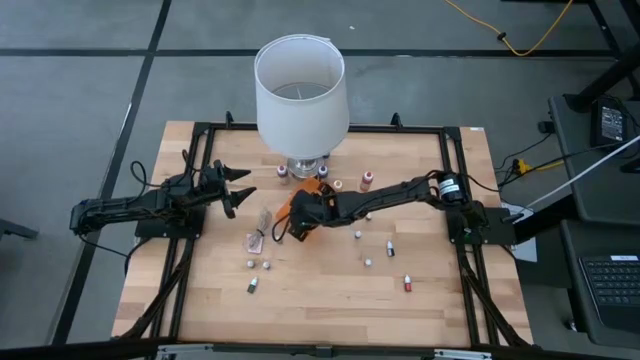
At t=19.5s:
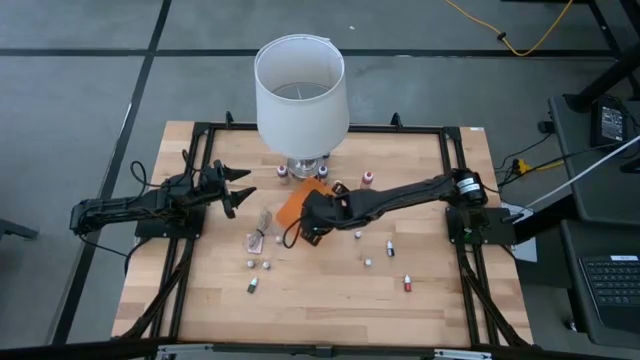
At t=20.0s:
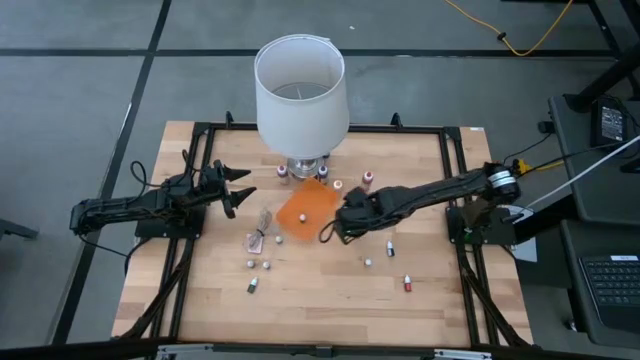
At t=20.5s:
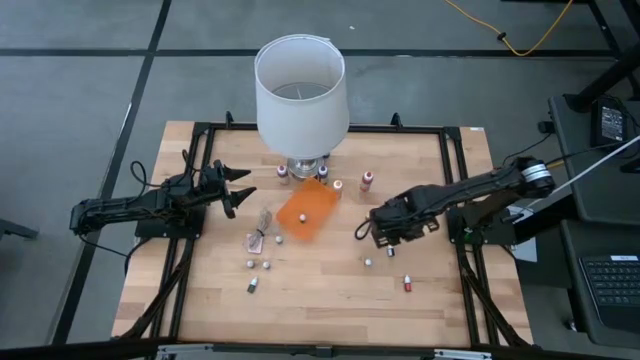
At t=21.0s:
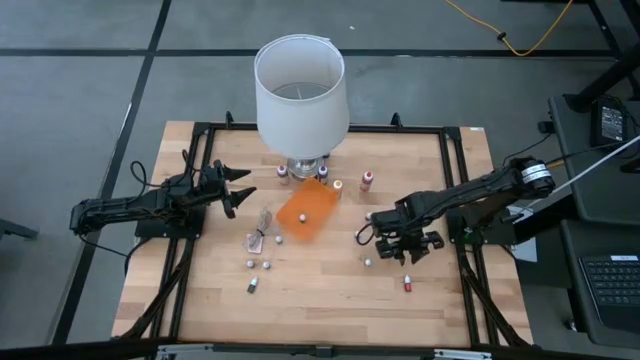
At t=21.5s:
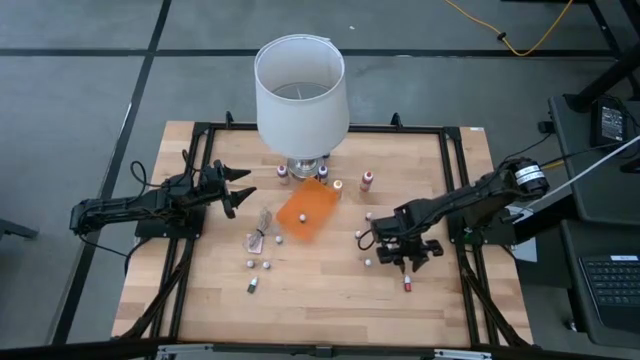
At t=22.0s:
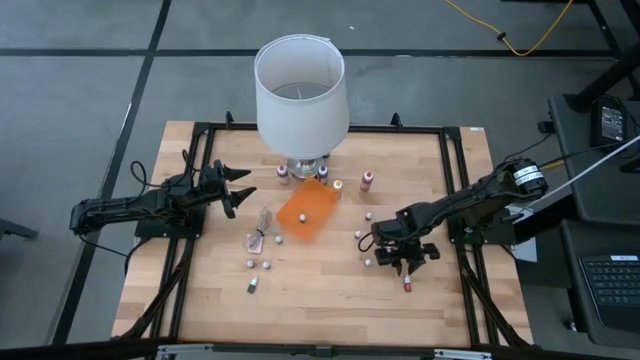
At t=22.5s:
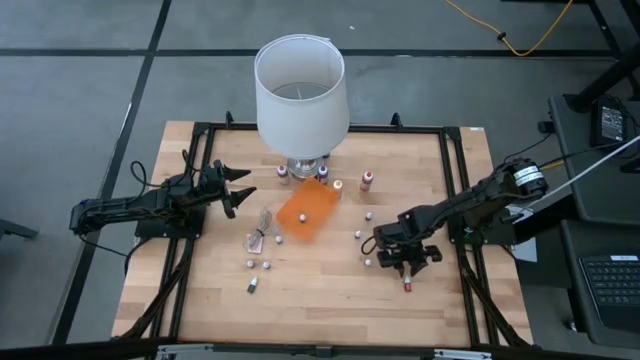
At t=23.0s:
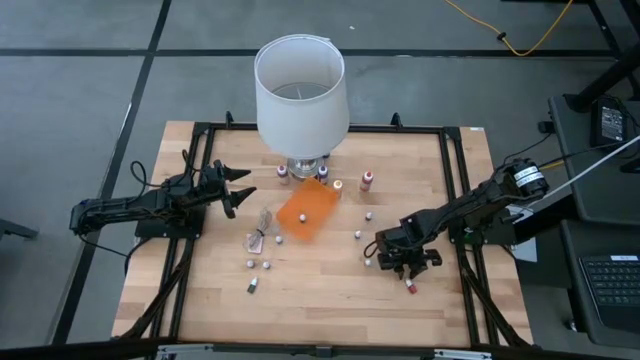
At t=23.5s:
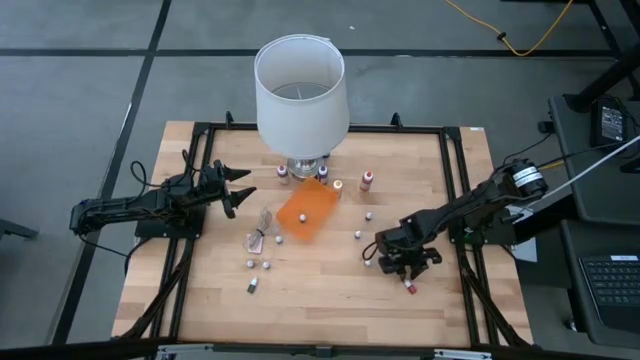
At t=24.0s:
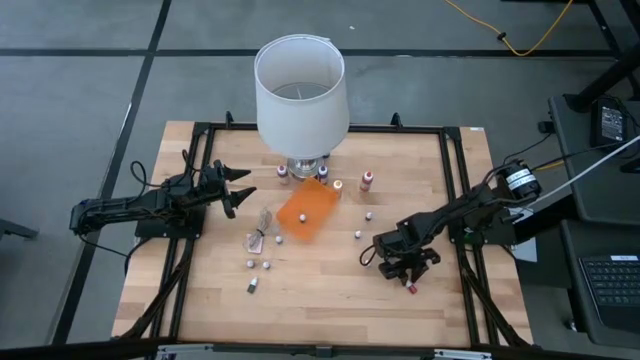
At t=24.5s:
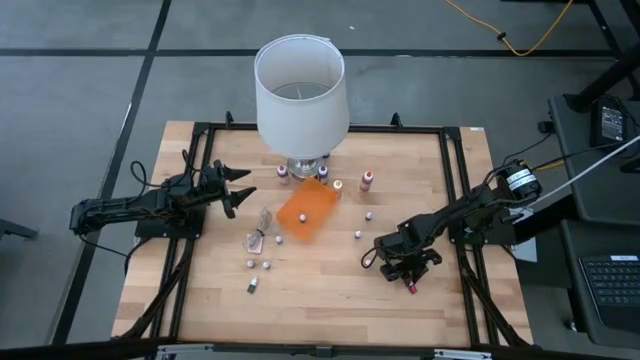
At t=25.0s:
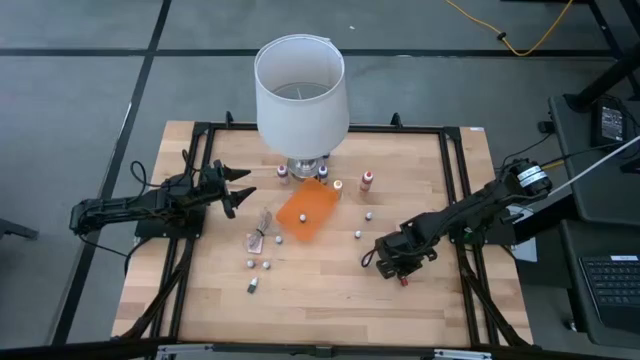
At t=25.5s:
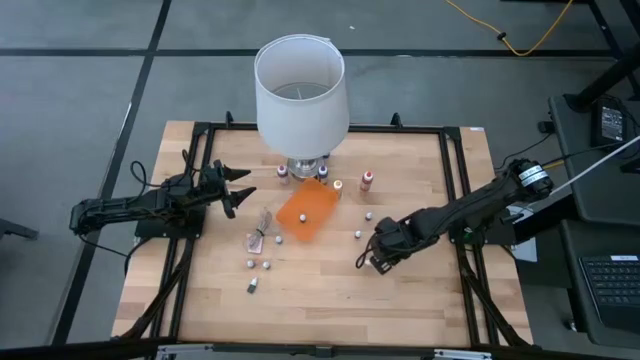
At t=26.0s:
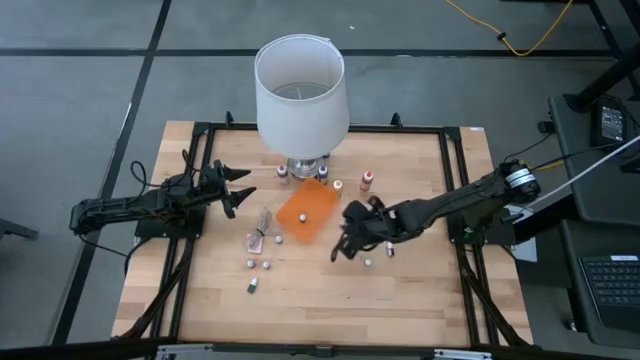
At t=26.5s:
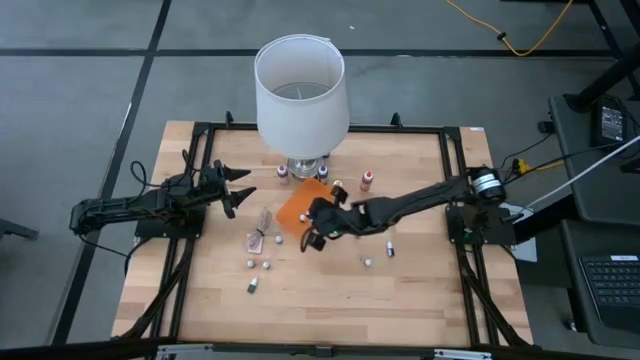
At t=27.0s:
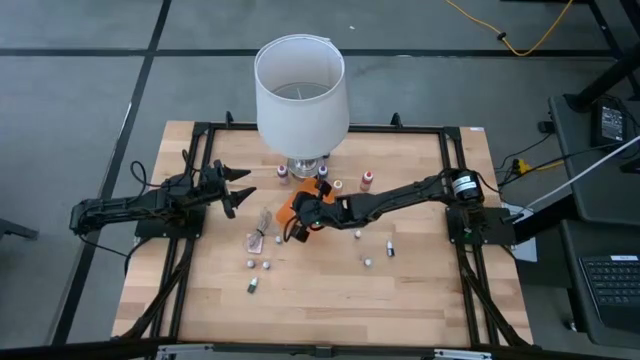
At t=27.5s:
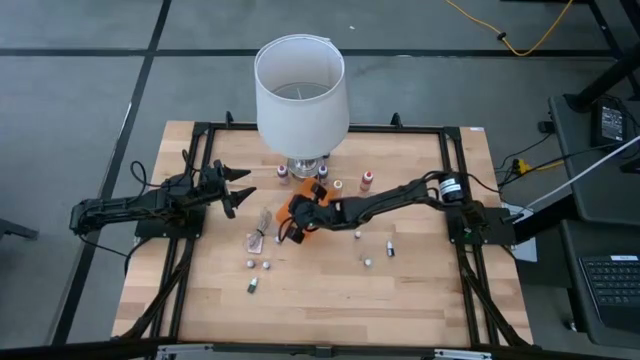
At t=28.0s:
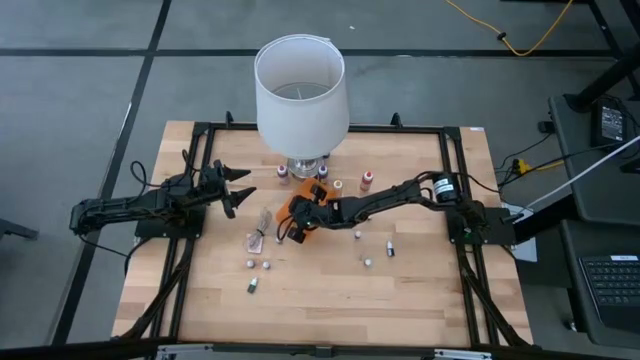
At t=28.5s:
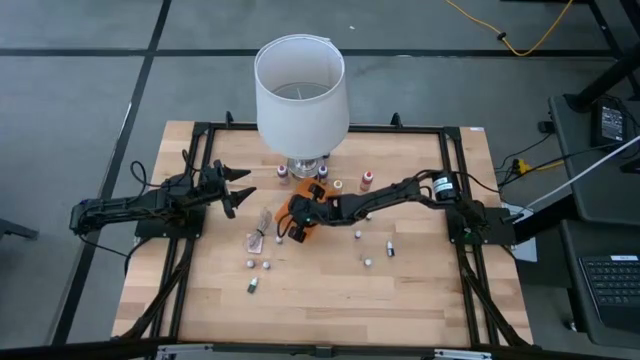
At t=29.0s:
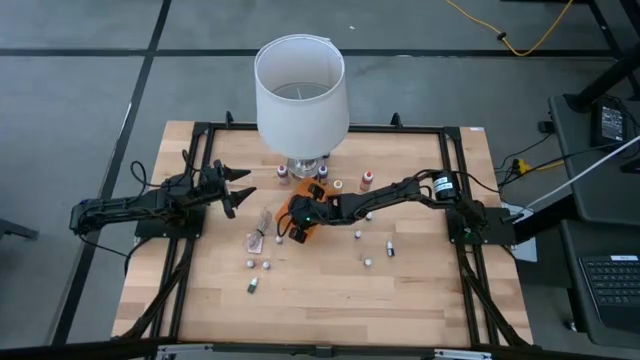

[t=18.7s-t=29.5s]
Task: Pick & Place food coloring
Put the small red food coloring bottle into the orange bin

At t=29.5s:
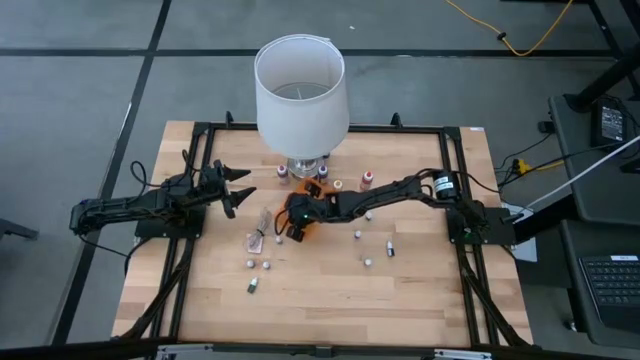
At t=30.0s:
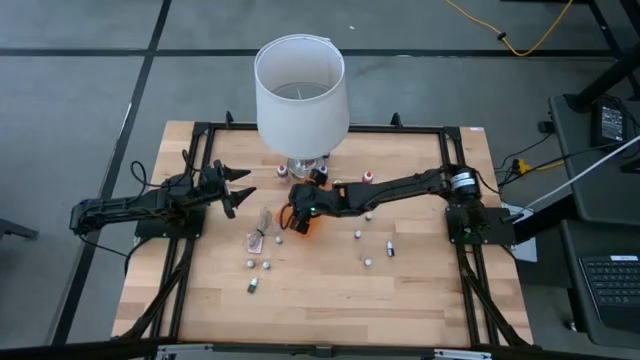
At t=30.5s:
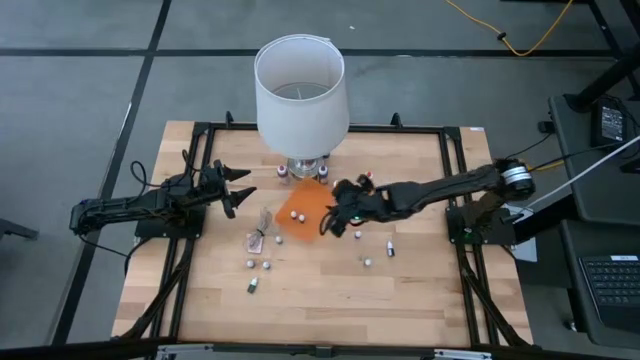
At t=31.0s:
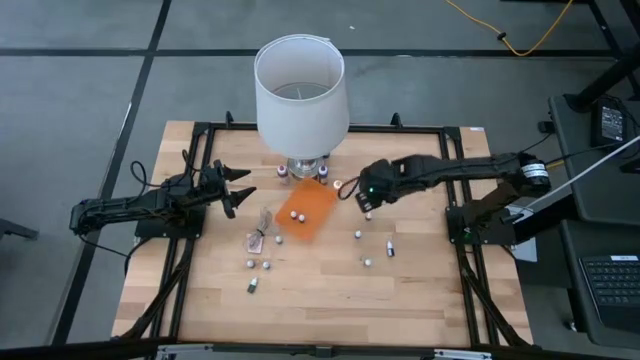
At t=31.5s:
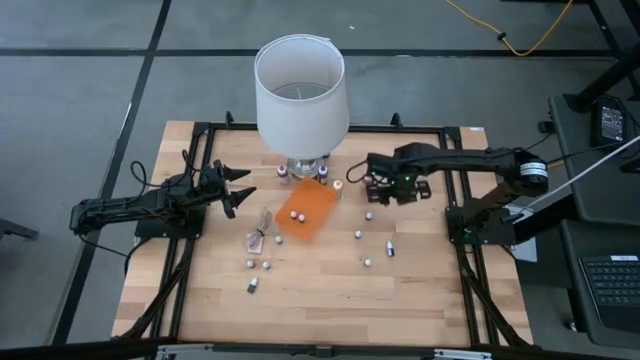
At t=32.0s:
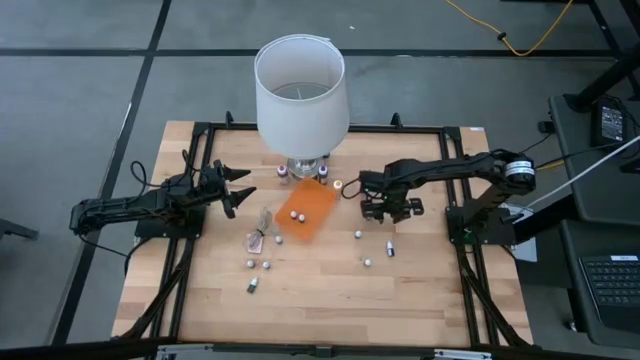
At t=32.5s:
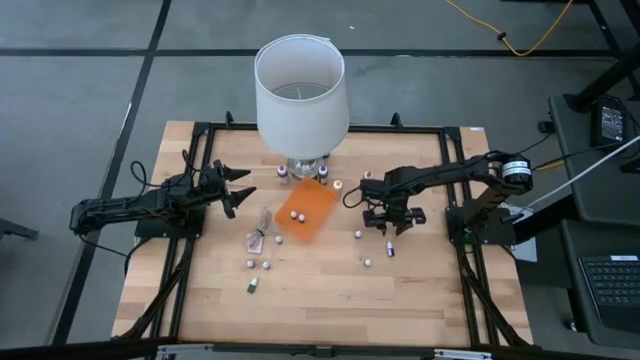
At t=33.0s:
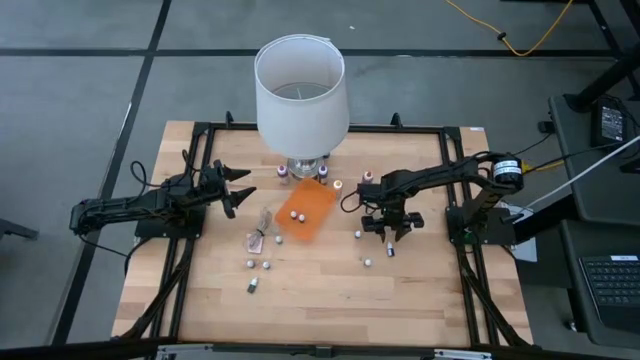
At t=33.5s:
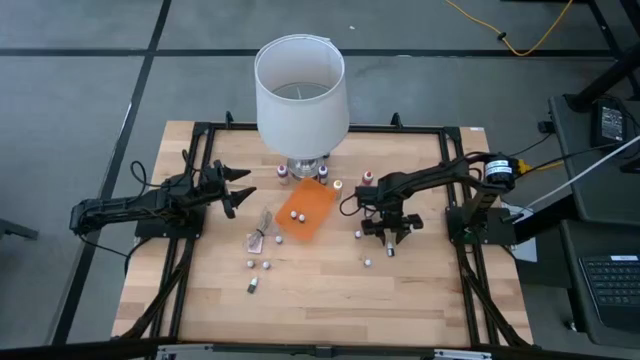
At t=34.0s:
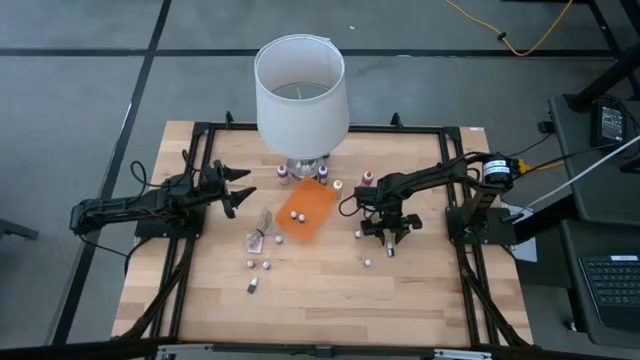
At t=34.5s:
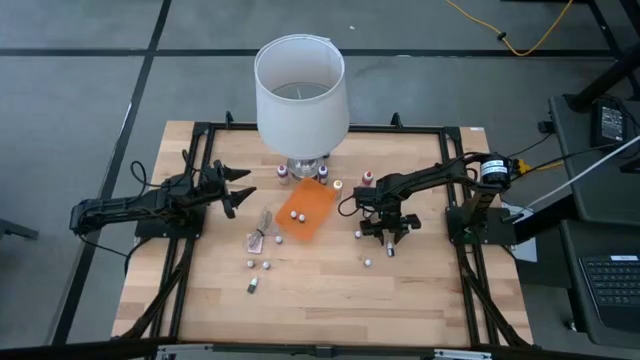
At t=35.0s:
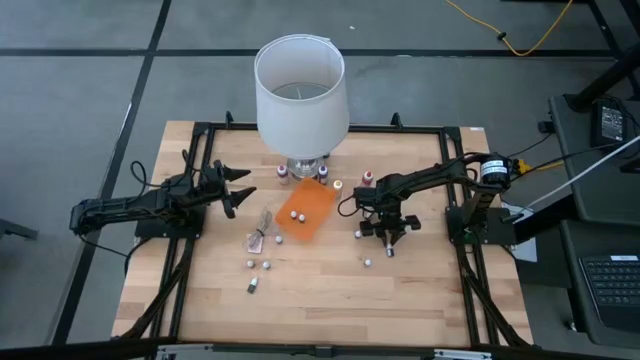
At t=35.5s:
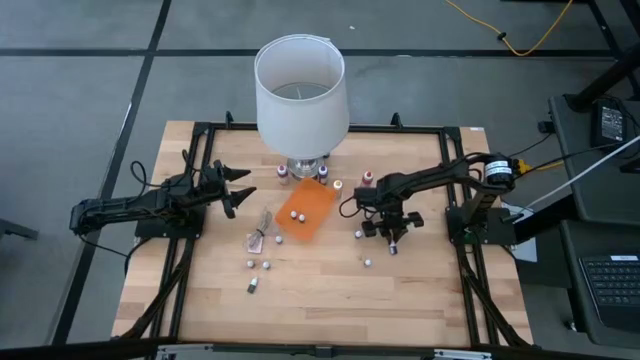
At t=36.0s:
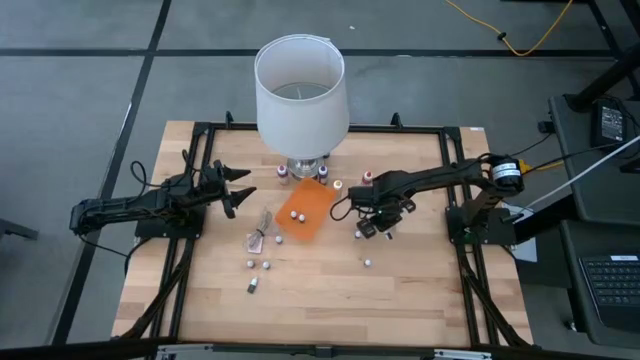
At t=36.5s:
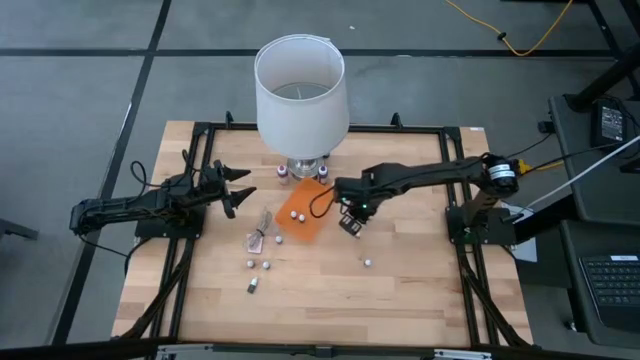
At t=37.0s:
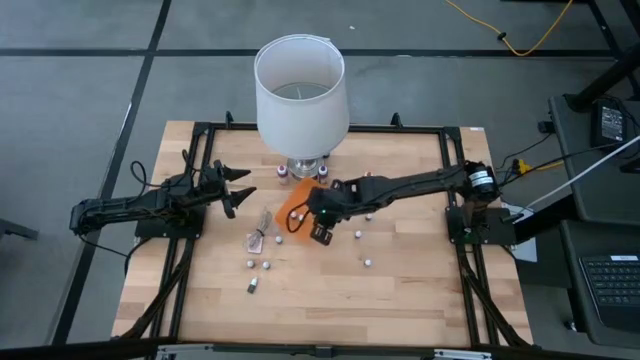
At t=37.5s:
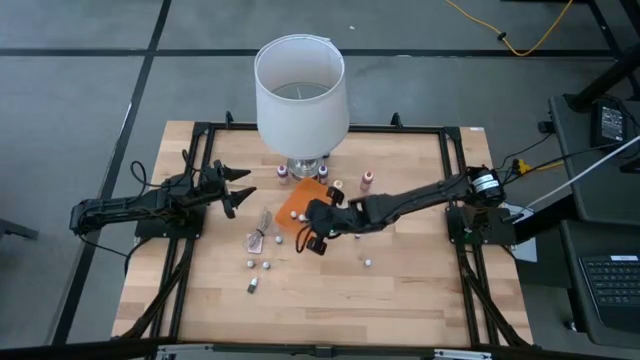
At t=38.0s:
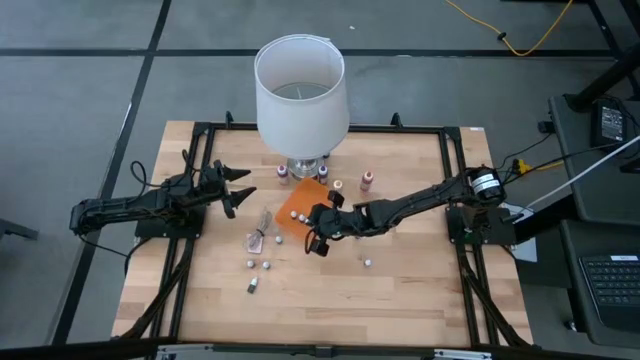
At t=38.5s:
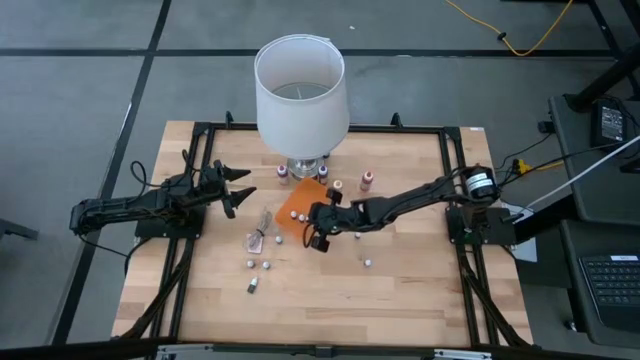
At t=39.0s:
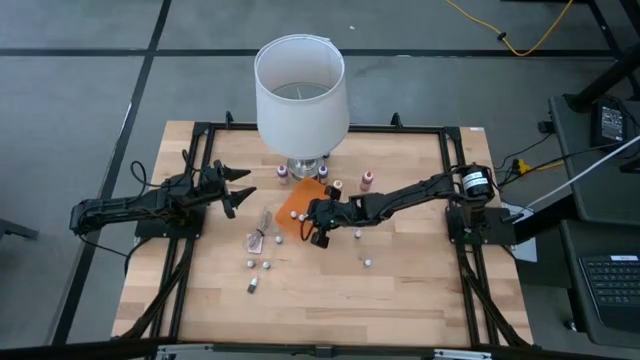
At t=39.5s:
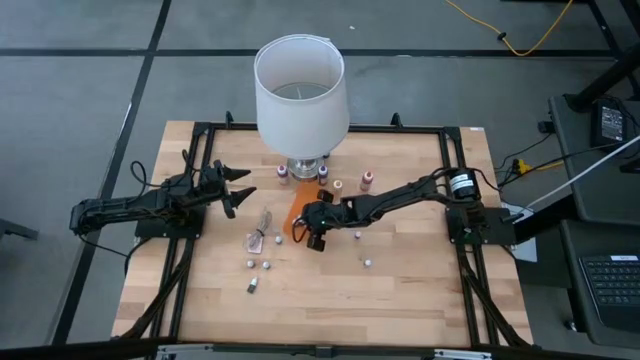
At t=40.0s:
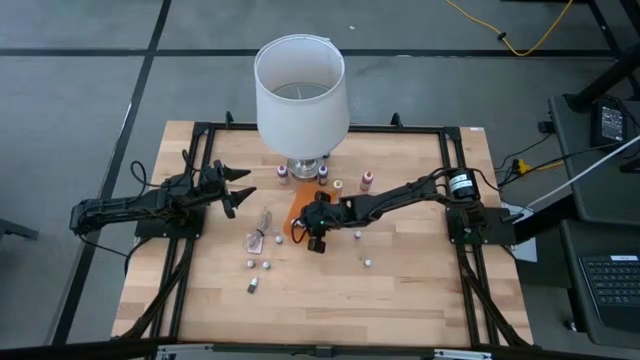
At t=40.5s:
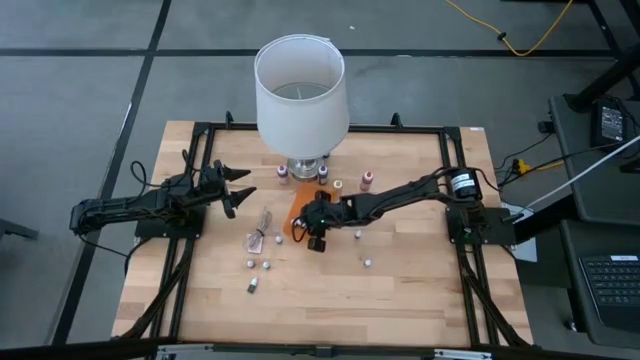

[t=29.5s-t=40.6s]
Put the small red food coloring bottle into the orange bin
